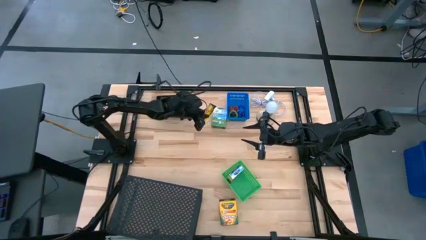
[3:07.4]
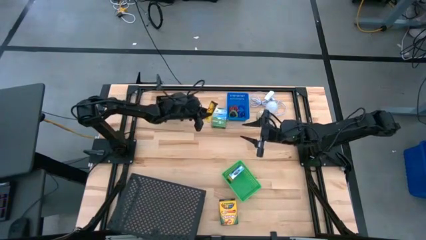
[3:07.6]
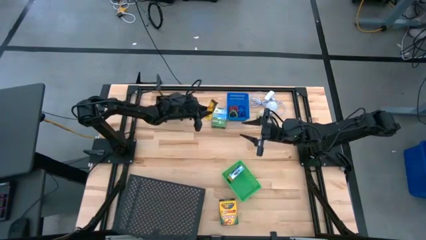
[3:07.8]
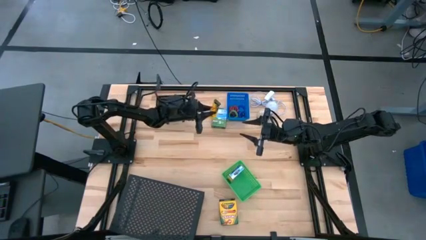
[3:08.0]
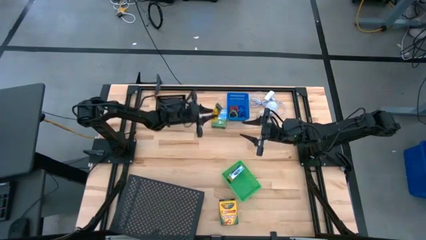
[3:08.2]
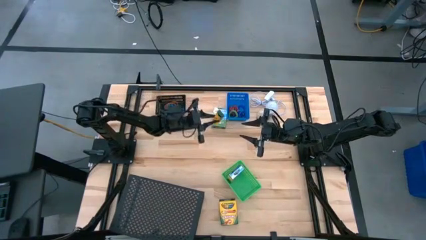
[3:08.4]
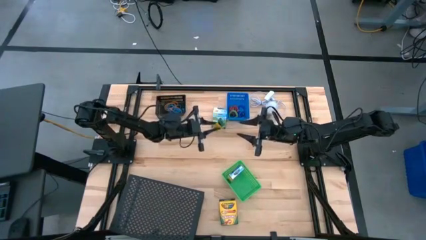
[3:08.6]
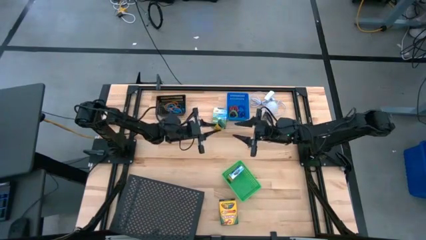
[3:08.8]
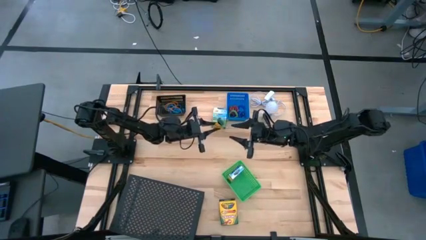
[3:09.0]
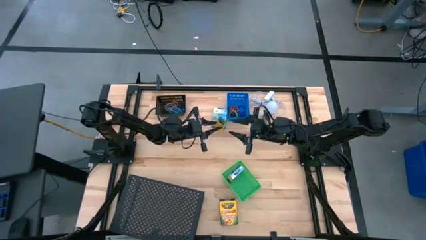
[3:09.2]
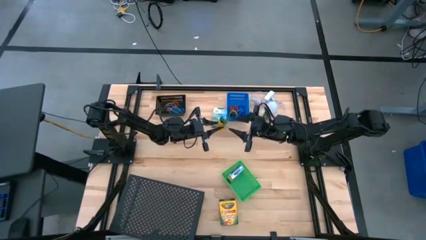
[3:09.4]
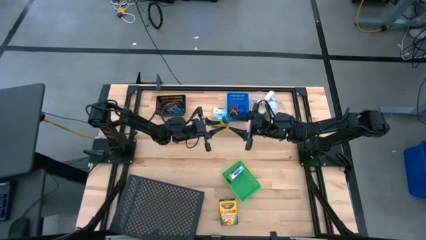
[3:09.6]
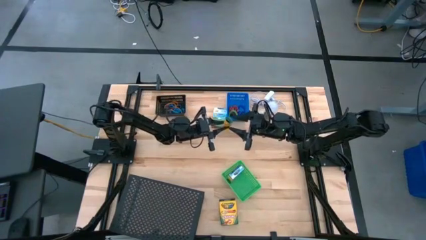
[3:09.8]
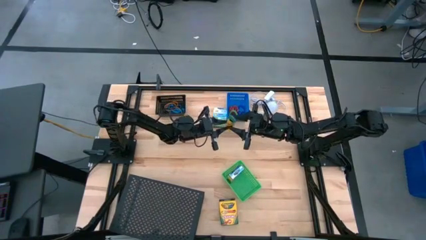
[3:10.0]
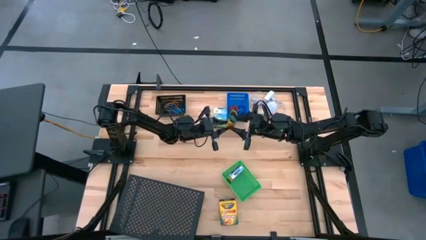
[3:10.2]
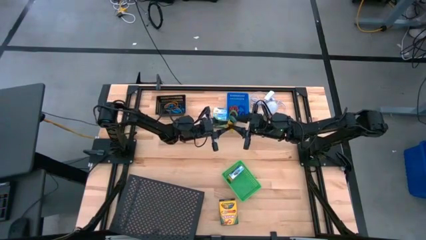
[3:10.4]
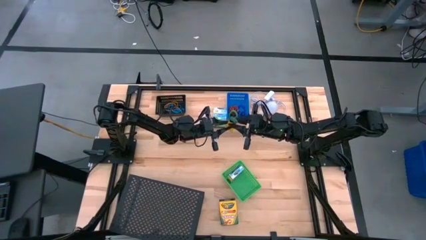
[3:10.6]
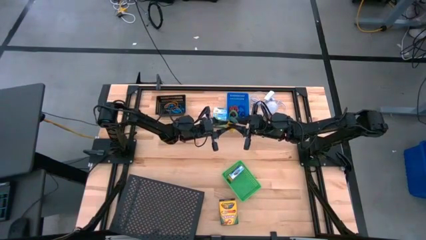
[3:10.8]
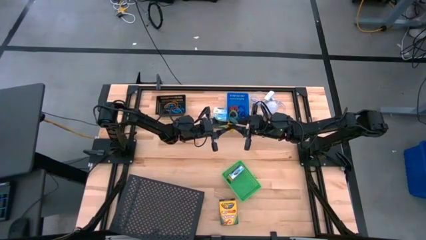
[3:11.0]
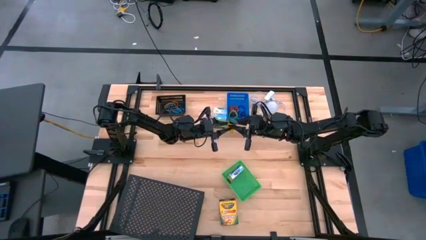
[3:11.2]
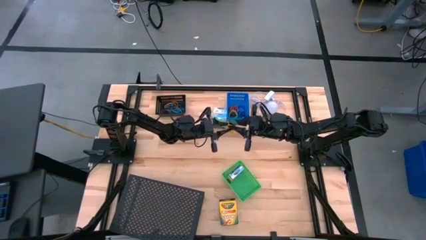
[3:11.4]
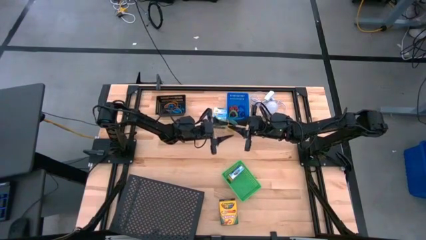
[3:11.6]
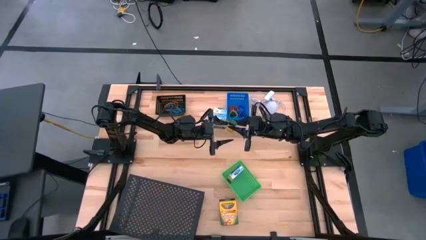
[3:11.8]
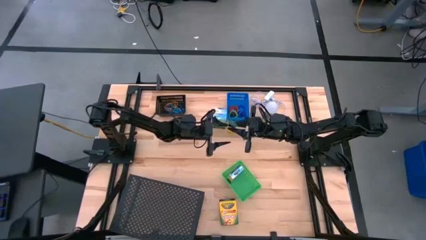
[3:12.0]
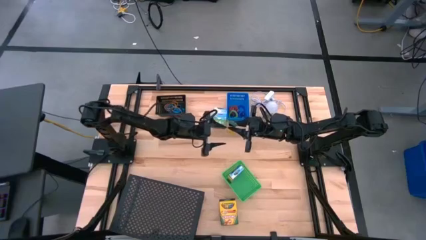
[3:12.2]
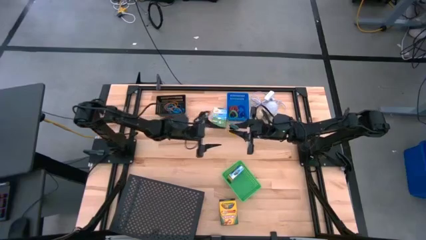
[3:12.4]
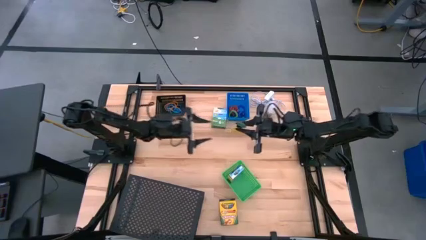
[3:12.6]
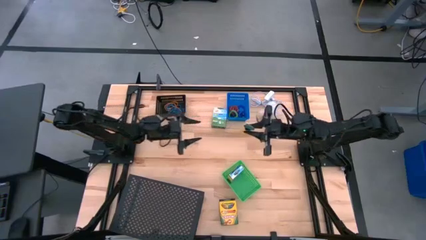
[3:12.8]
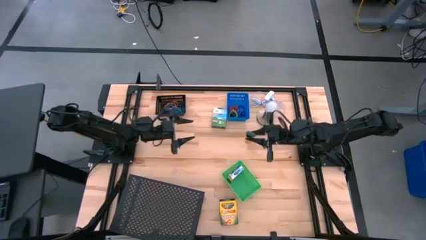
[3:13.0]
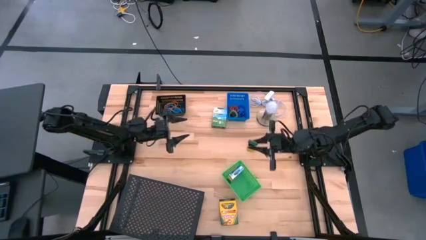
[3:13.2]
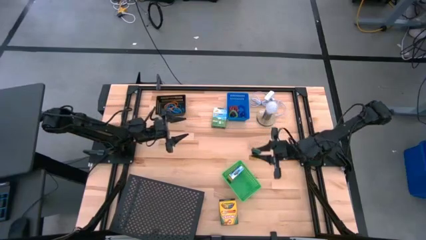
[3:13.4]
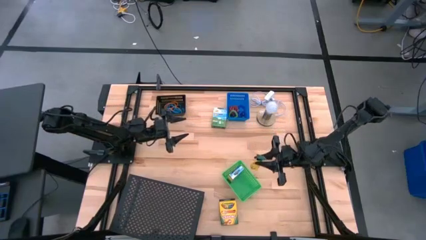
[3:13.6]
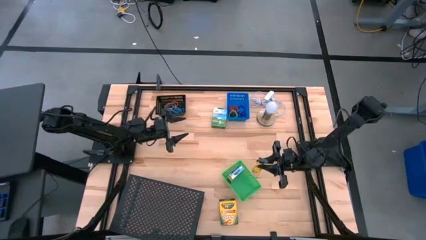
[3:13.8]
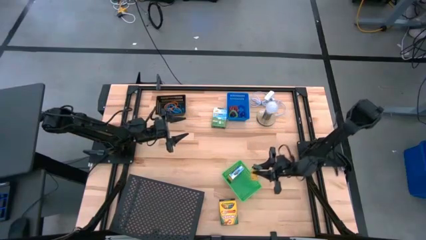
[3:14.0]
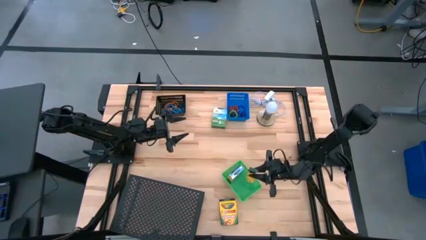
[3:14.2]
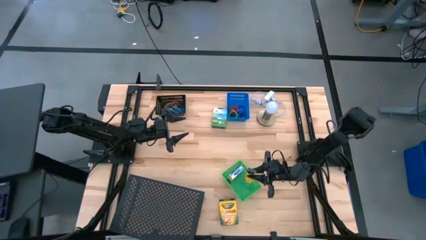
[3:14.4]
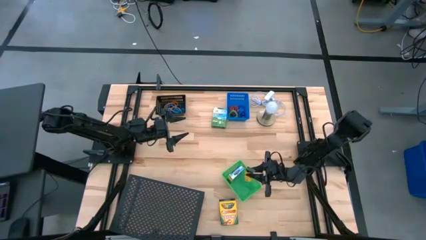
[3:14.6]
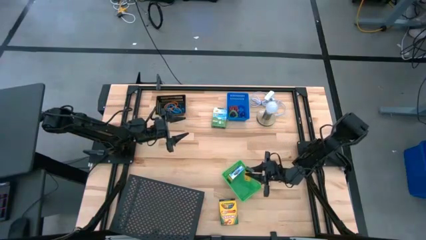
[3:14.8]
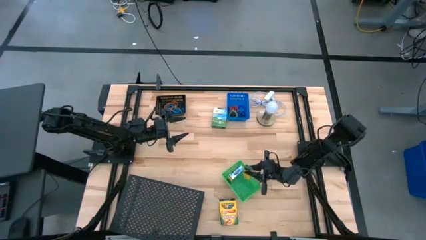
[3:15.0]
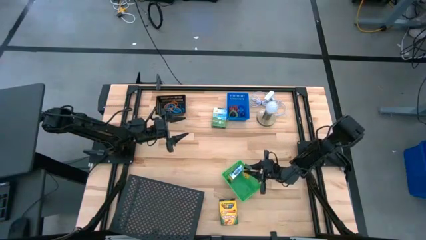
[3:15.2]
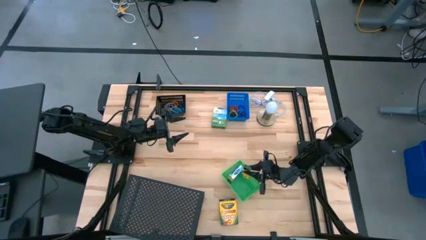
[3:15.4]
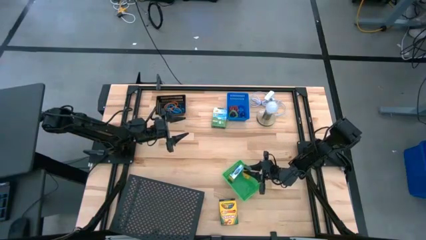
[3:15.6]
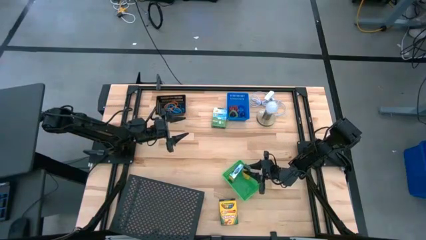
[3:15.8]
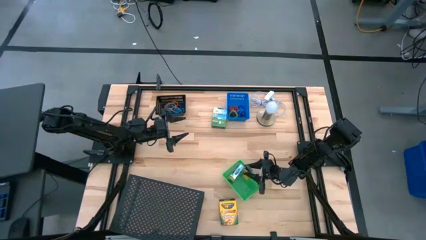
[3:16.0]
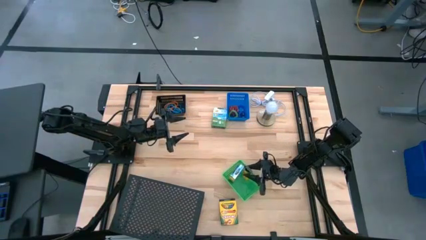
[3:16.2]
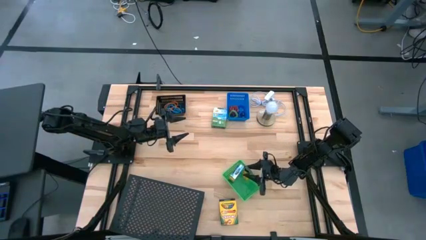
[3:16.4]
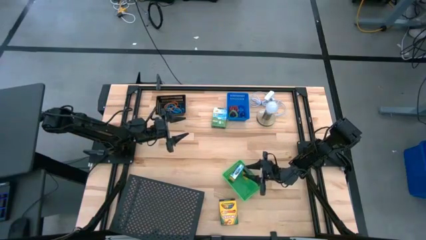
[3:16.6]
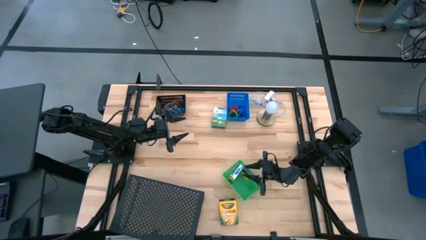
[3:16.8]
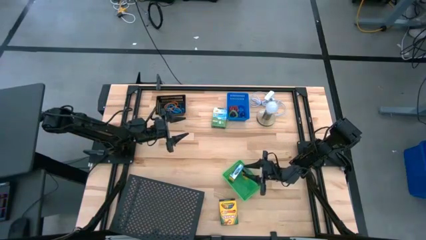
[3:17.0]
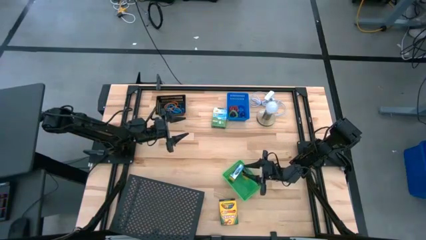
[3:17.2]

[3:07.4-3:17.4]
Task: Pick & Place Office Desk Supplies
Put the small crayon box into the green bin

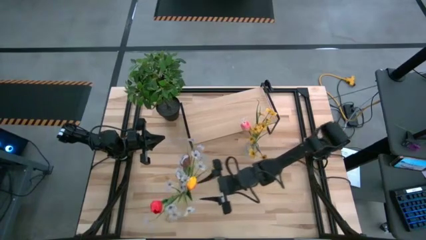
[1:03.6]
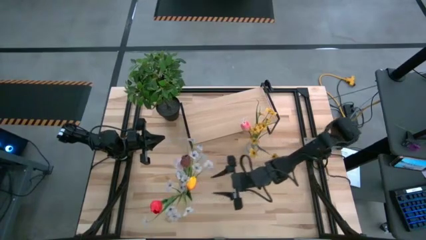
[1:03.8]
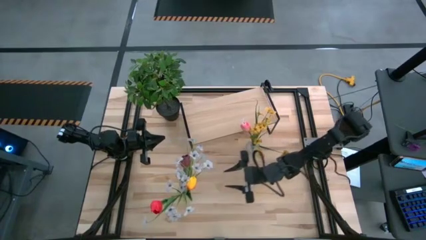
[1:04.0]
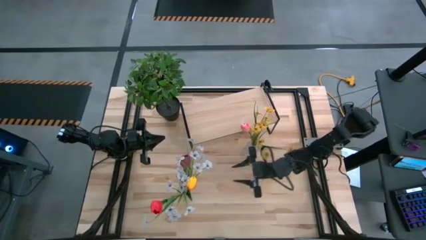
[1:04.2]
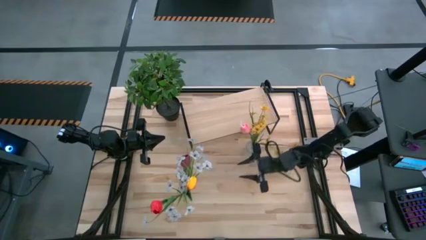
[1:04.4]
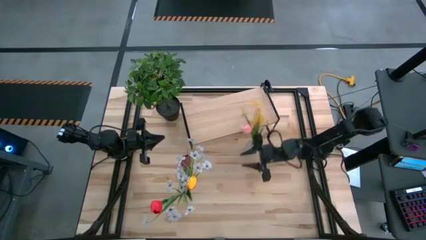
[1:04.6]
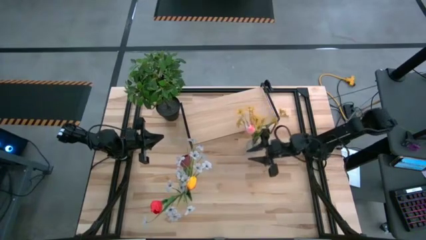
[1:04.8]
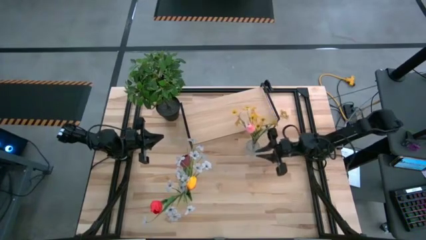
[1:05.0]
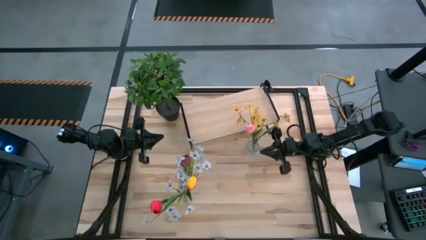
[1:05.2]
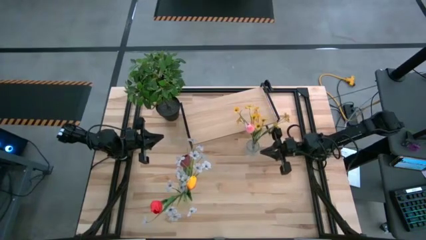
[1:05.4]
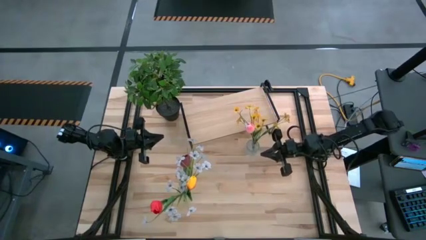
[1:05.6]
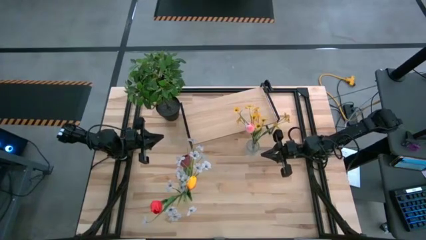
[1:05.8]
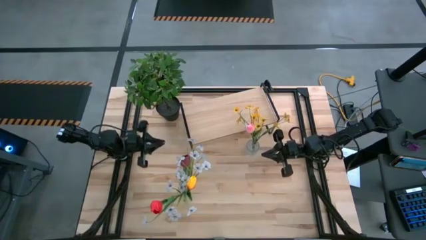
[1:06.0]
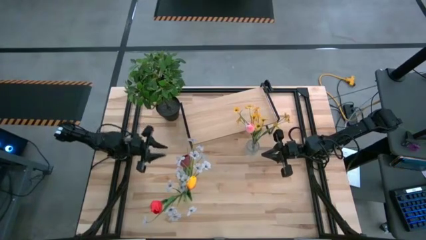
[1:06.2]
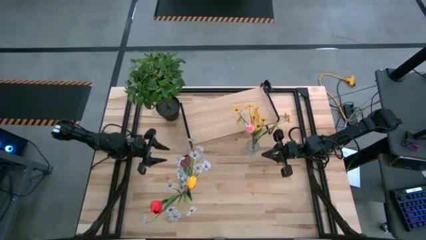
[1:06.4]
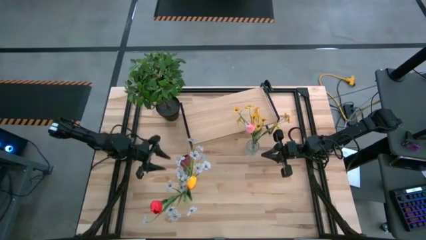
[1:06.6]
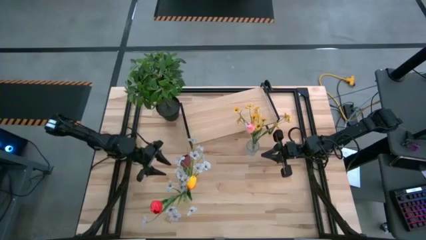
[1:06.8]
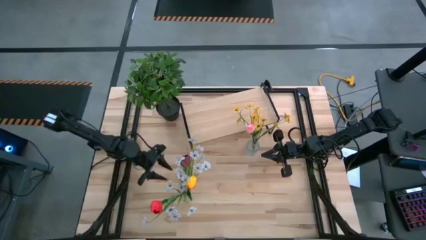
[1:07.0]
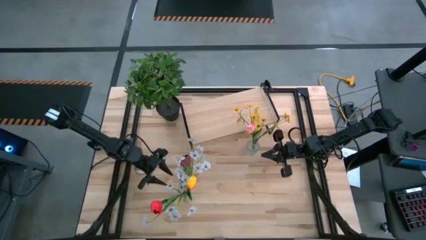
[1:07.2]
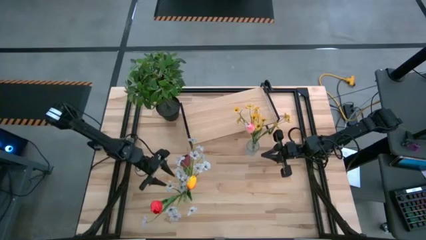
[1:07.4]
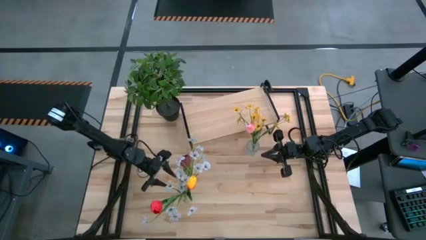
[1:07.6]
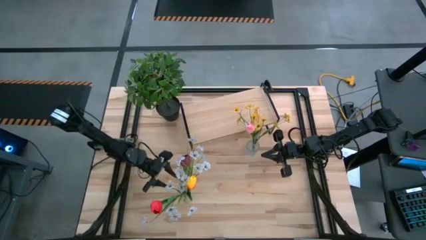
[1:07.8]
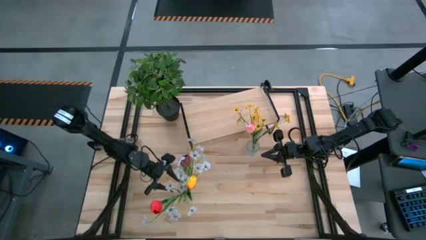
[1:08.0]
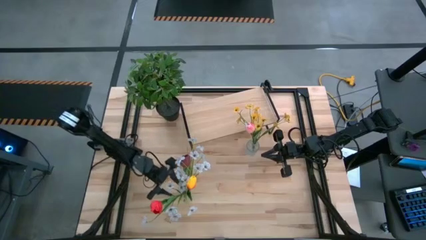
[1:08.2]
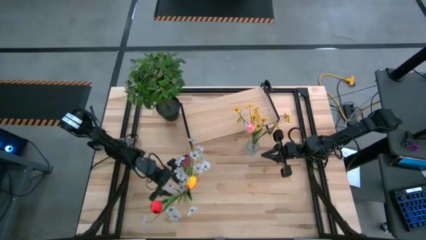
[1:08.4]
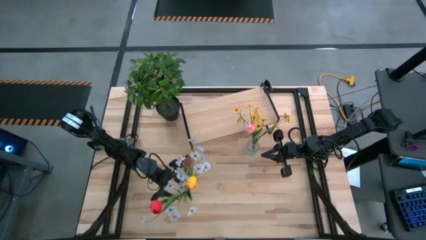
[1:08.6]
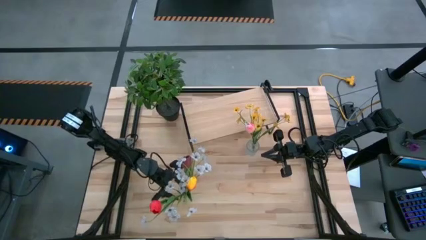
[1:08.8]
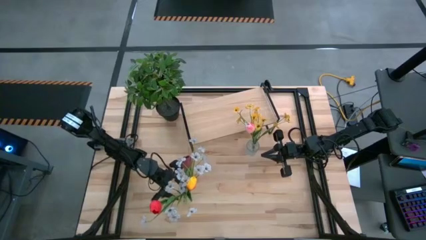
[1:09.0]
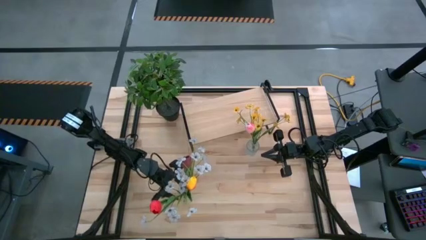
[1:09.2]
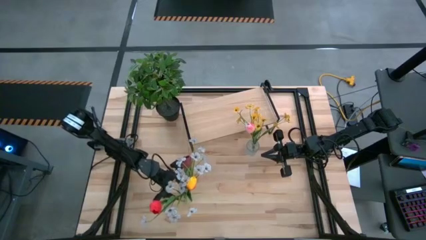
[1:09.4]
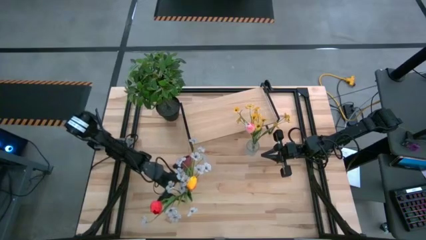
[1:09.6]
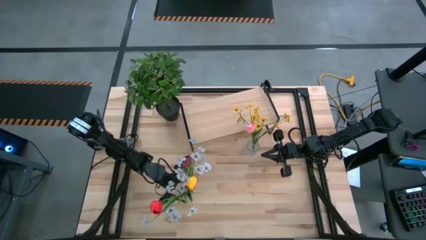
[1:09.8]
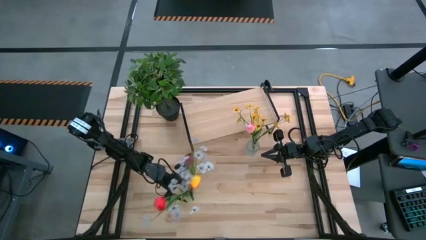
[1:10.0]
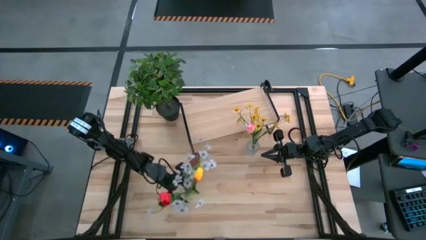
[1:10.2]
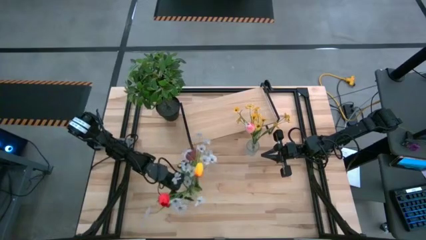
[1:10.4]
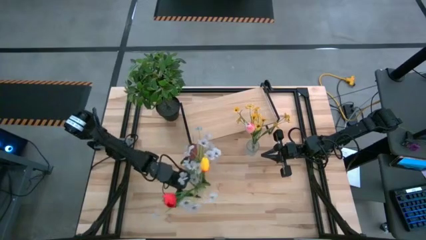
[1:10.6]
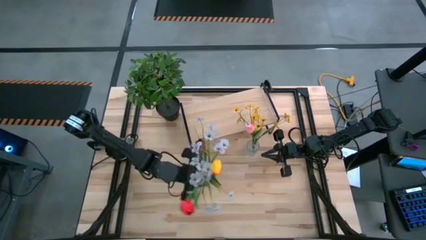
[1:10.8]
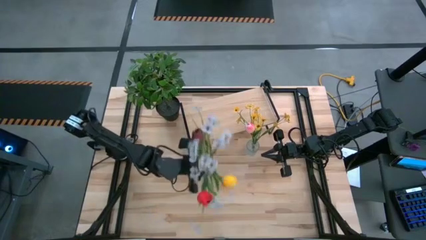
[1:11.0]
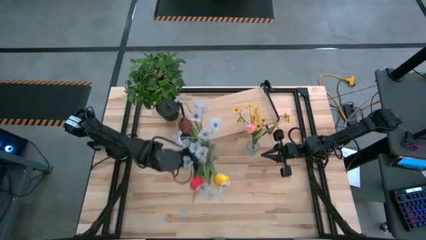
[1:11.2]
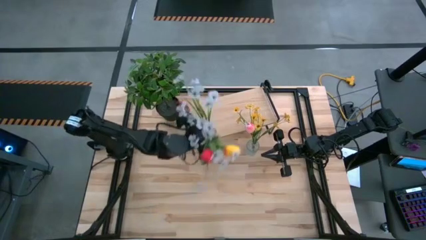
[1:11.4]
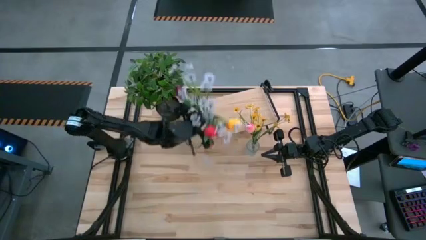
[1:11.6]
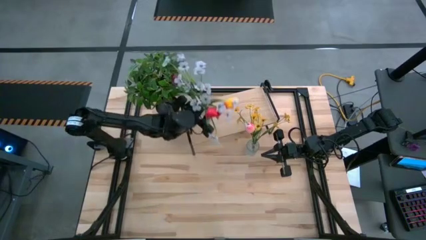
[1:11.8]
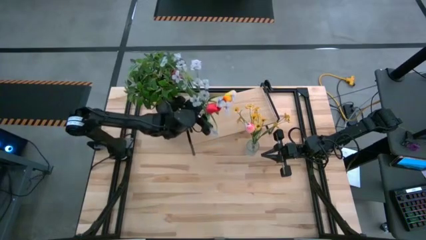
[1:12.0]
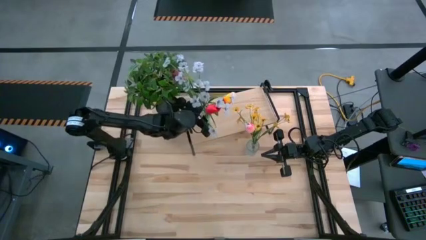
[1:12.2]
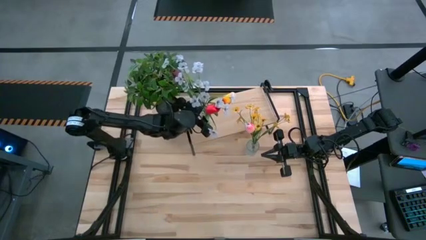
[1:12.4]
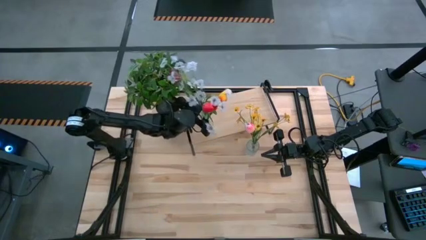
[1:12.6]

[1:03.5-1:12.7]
Task: Pick and place flowers into a vace then onto a shelf
Move the bottom transparent vase on the shelf
